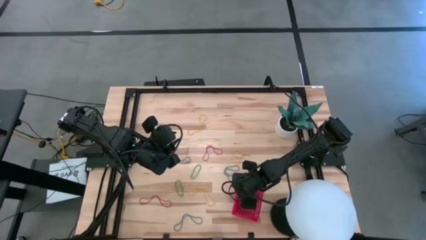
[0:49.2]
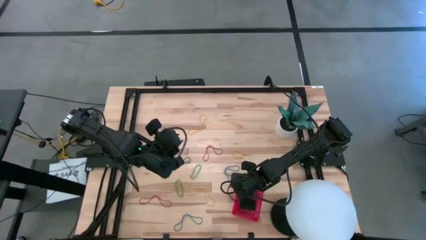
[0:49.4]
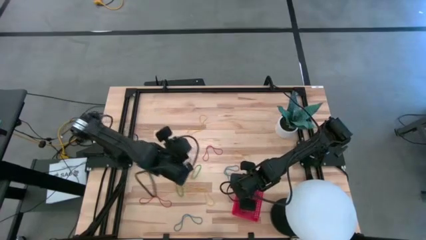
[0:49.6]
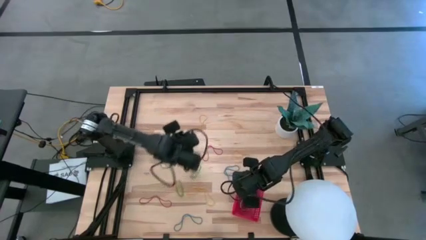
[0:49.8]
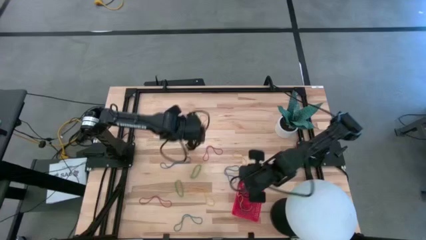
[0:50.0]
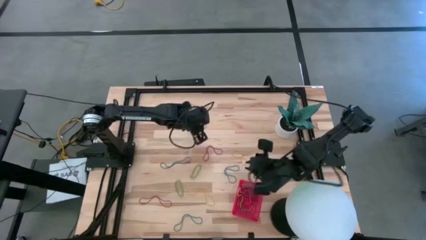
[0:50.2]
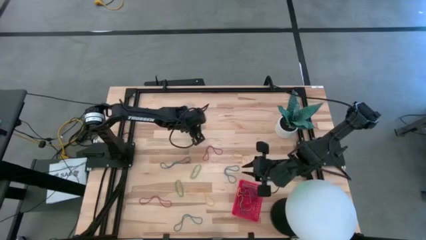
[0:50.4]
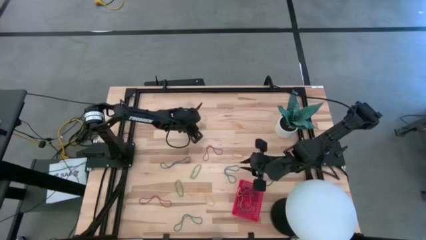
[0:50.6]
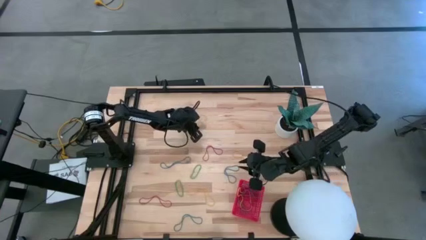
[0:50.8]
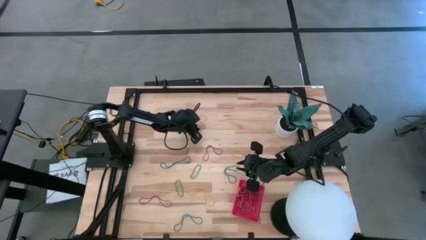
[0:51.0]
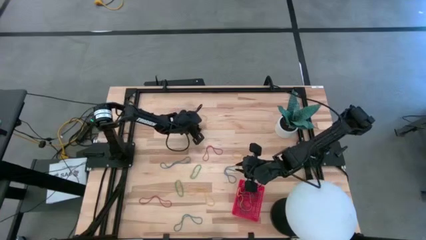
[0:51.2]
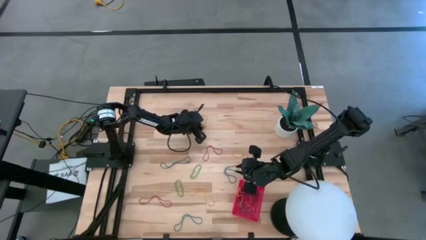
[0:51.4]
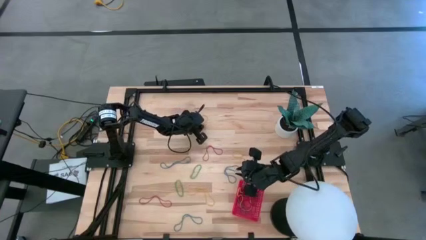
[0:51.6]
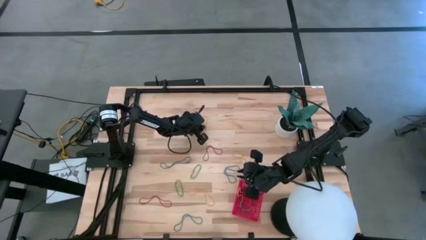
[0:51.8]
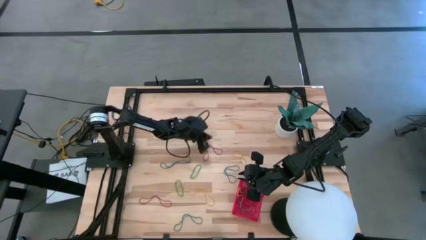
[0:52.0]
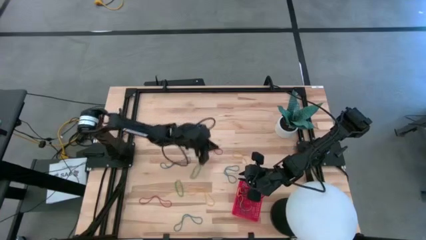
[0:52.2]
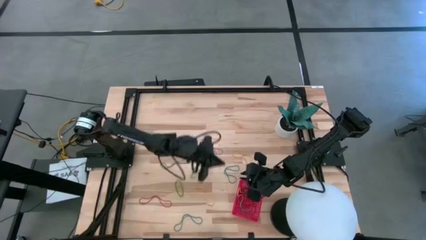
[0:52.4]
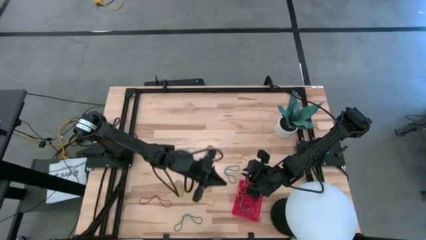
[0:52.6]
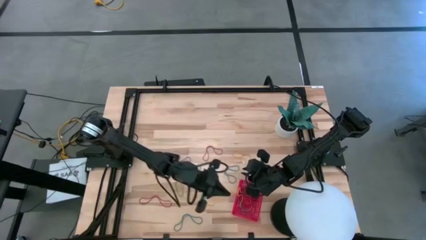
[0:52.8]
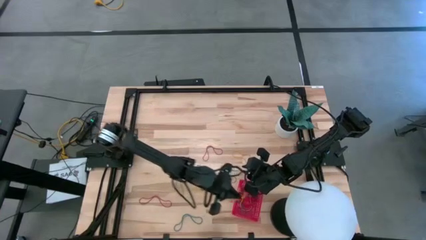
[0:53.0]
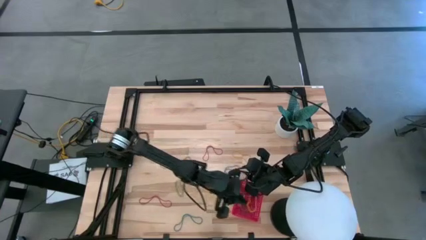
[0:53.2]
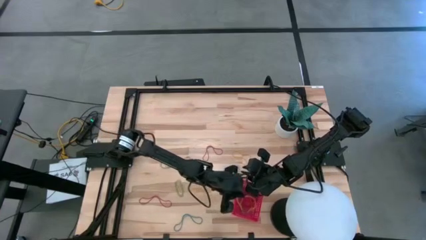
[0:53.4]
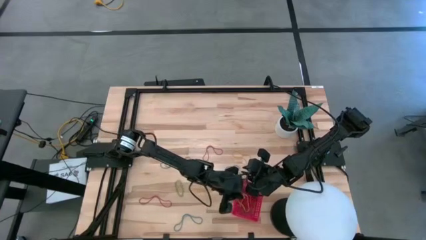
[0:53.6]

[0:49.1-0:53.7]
Task: Pick and place items into bin
Put the yellow rubber band into the red bin

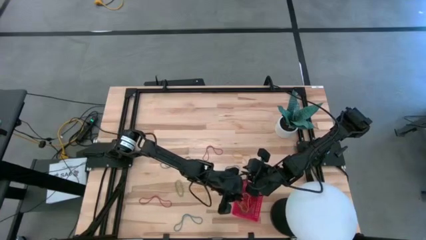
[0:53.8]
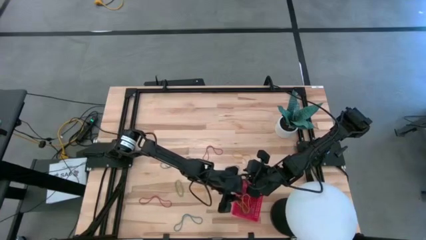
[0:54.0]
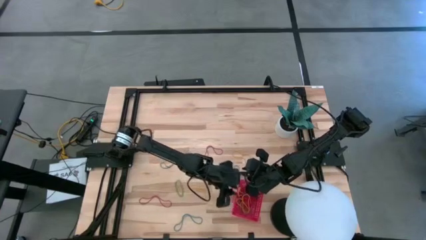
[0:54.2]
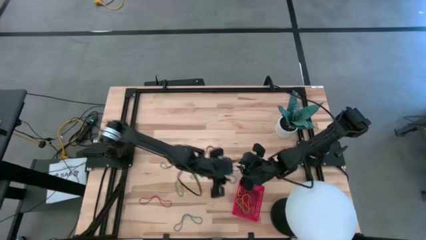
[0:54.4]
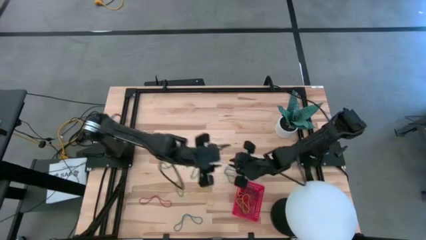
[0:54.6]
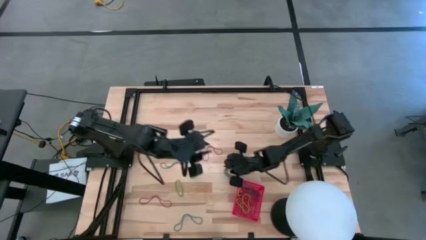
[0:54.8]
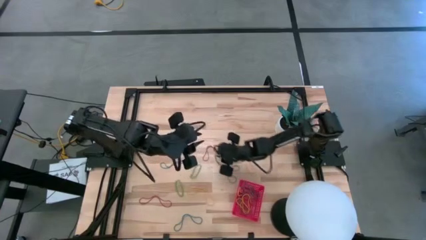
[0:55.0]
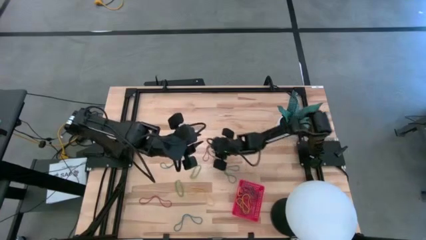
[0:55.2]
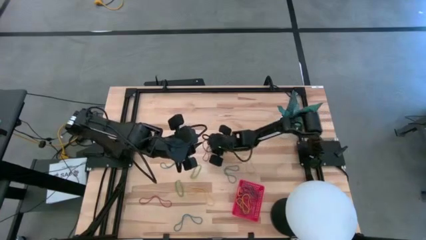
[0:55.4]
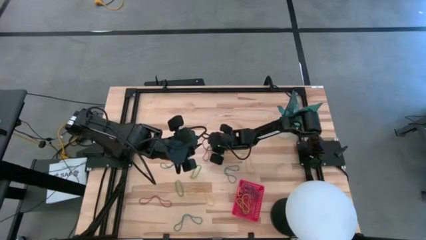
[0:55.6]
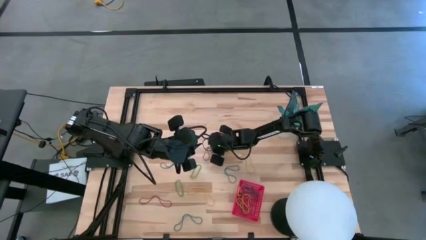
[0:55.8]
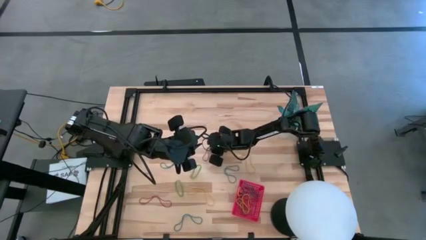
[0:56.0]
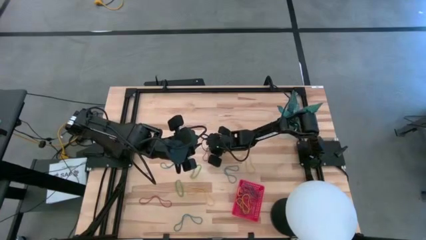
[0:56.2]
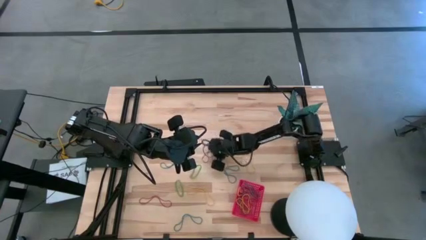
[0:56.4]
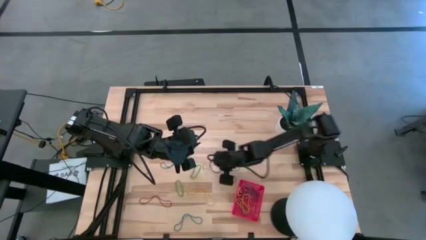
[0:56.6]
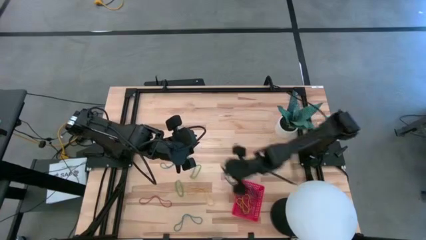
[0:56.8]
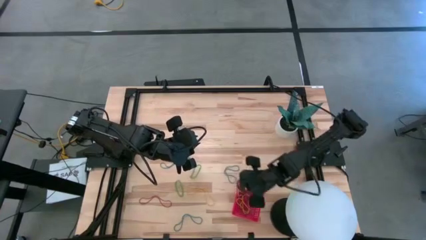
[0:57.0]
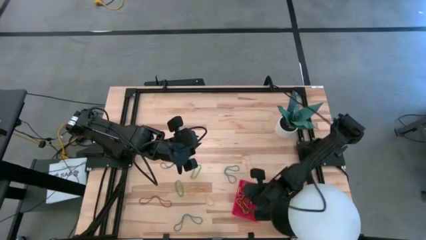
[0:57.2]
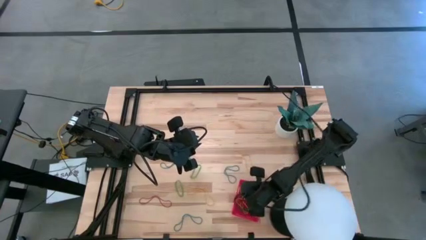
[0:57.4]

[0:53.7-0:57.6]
Put the red rubber band into the red bin

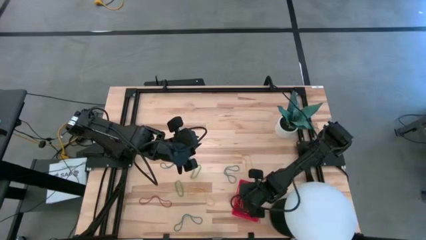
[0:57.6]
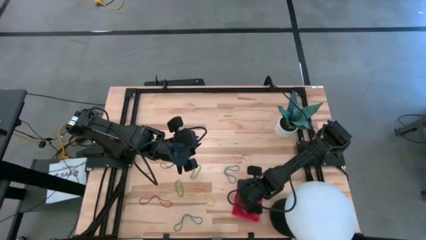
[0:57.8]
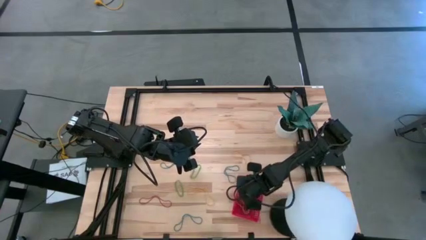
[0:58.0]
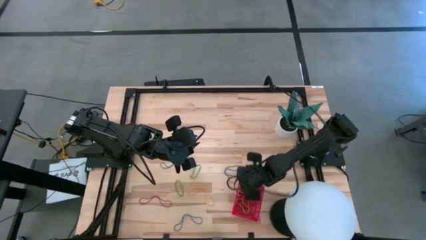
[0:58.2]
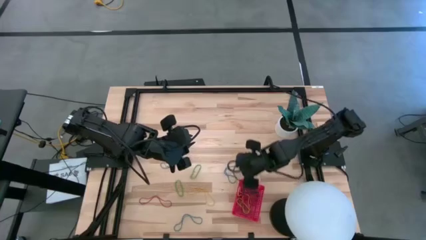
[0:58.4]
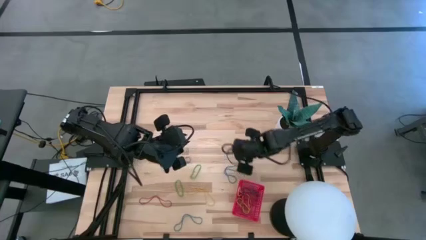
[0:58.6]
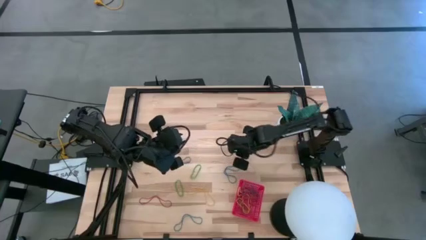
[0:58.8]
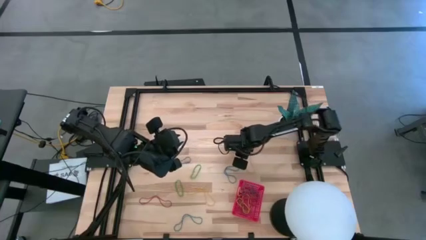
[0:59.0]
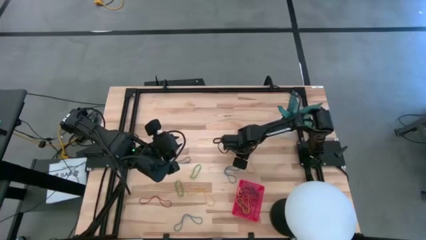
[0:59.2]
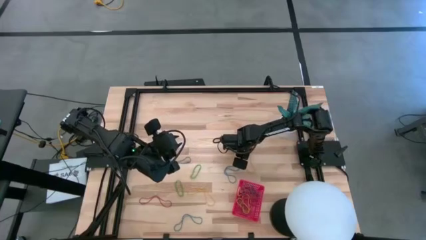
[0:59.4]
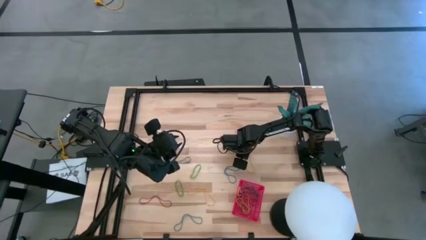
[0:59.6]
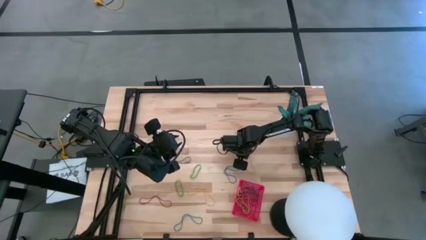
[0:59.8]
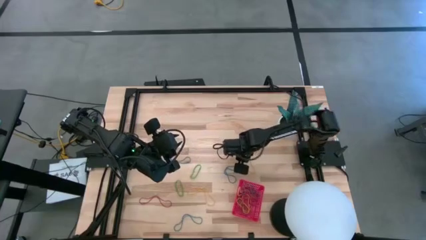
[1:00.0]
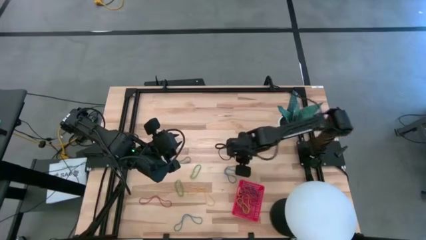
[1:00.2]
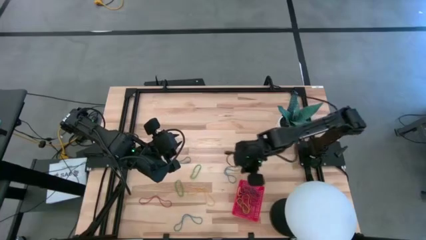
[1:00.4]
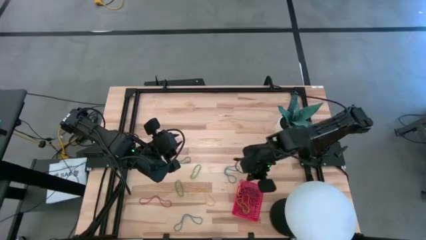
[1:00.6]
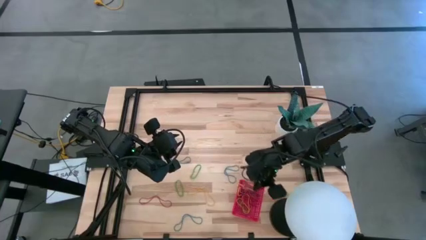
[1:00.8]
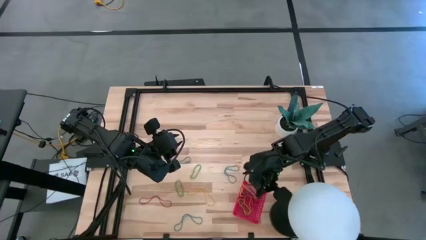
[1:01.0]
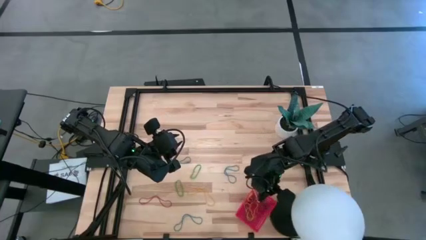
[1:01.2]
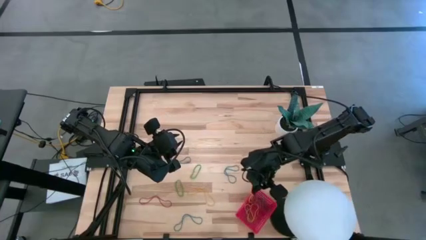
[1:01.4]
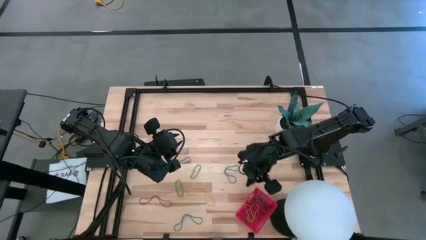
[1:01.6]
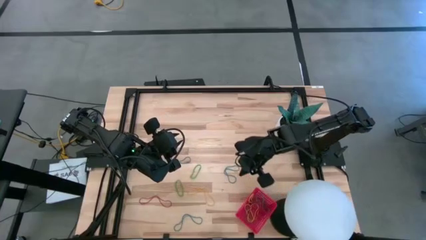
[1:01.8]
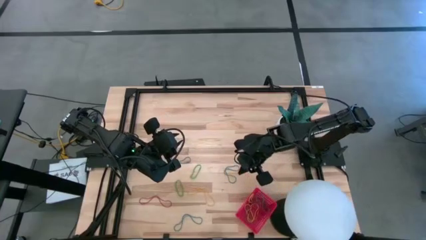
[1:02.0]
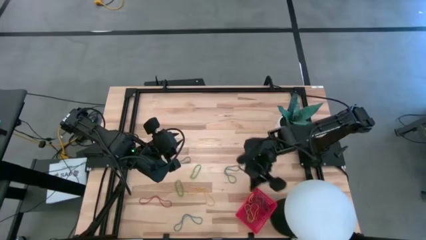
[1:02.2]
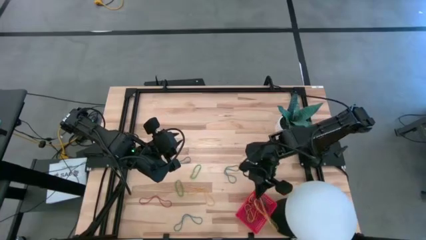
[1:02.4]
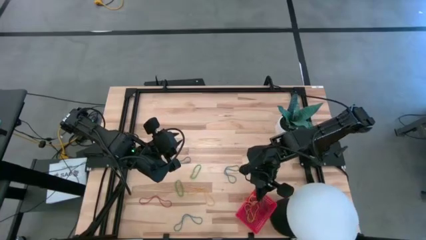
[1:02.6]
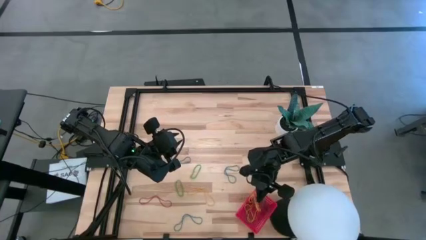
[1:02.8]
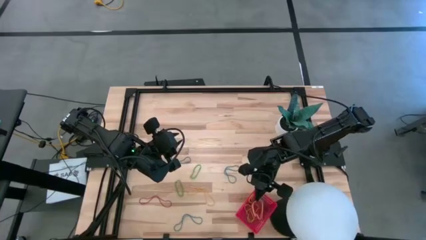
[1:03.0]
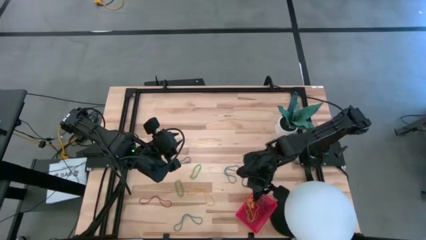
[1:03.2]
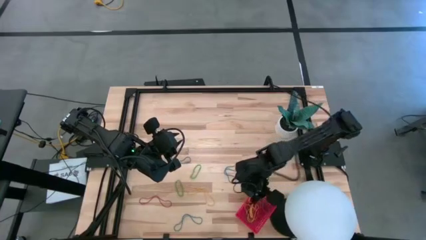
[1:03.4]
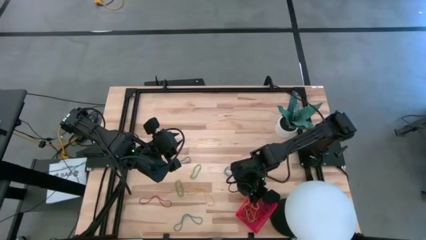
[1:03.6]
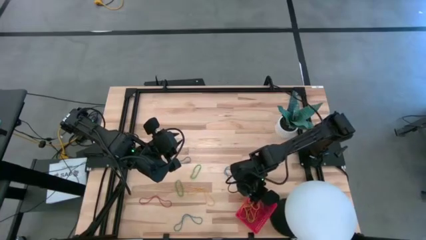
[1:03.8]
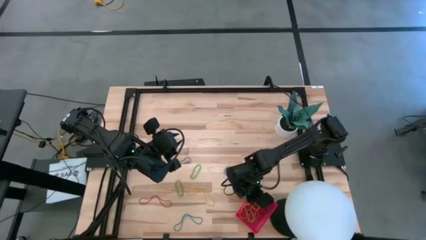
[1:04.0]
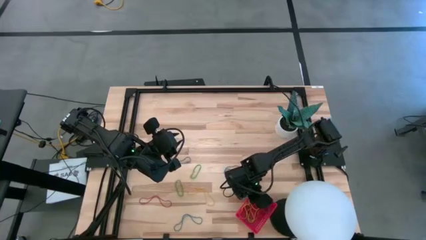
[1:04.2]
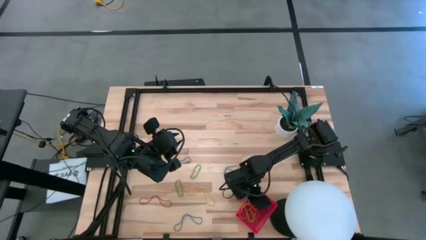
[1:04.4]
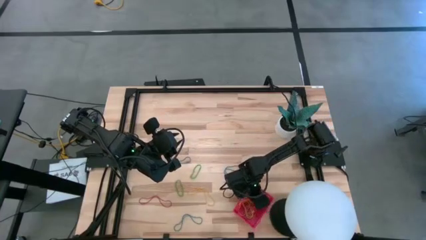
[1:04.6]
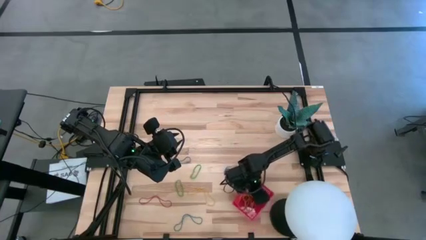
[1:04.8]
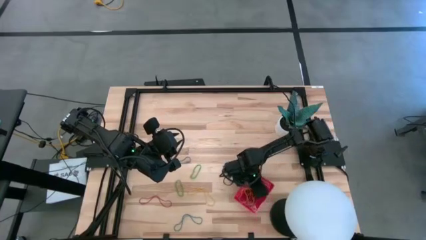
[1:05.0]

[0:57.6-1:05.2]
Put the yellow rubber band into the red bin
